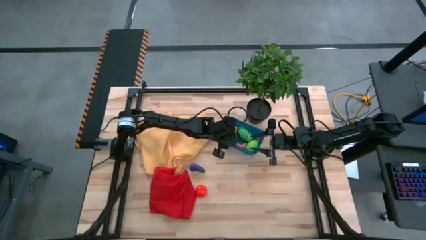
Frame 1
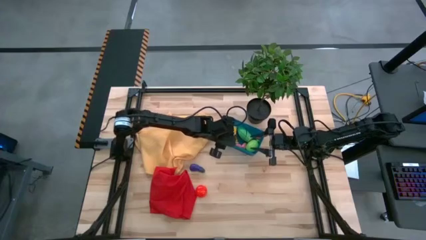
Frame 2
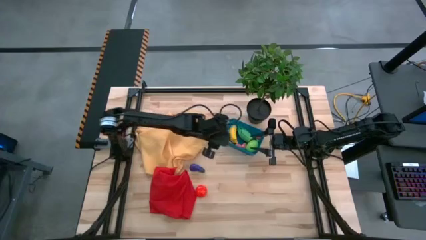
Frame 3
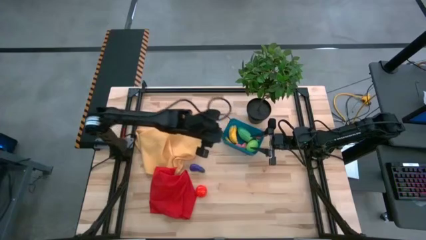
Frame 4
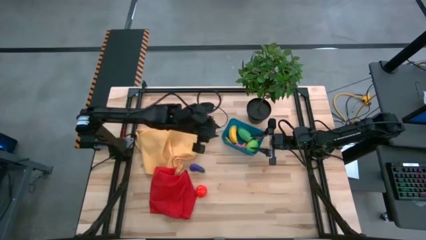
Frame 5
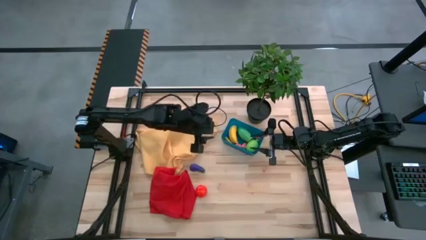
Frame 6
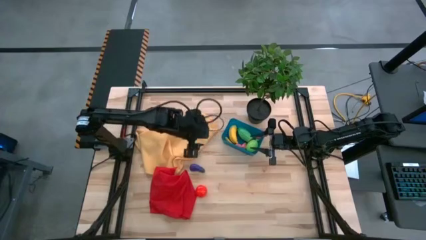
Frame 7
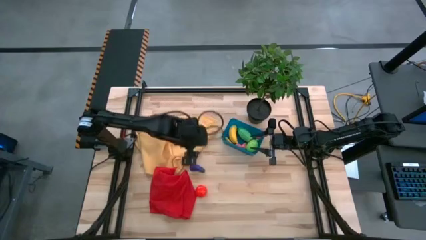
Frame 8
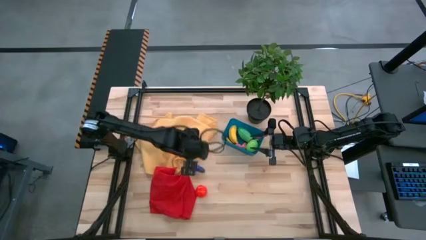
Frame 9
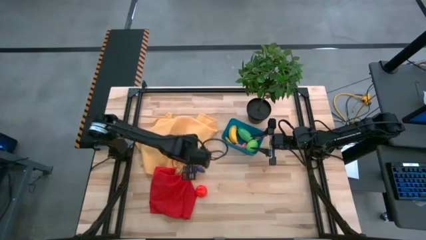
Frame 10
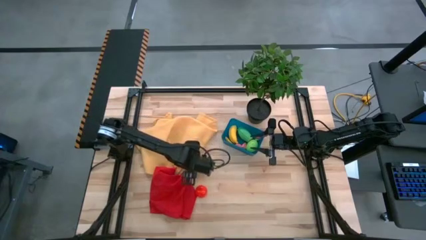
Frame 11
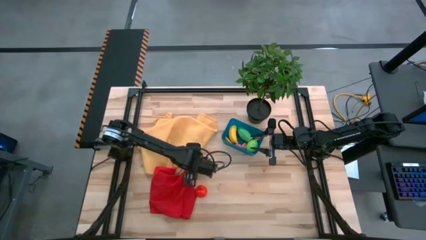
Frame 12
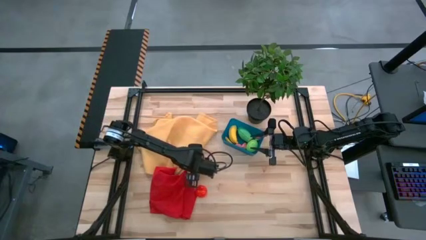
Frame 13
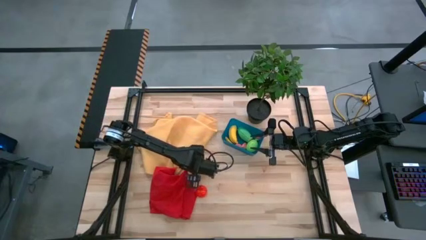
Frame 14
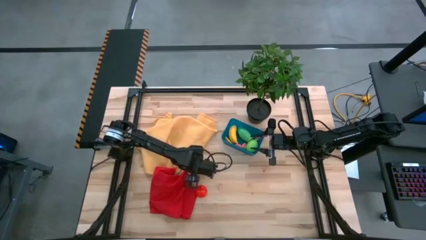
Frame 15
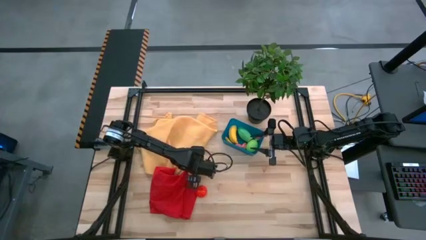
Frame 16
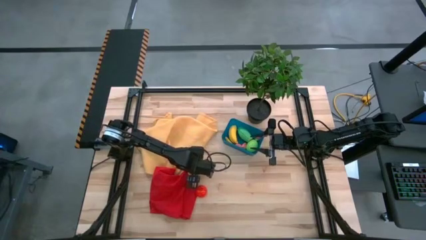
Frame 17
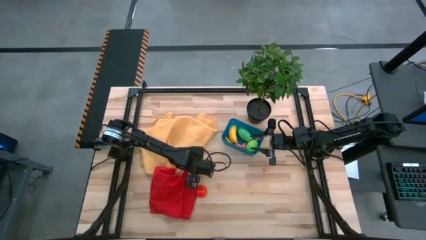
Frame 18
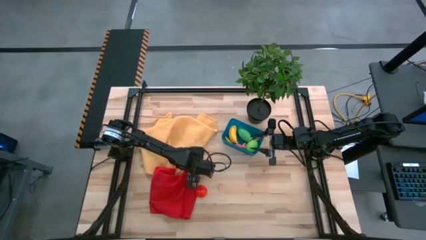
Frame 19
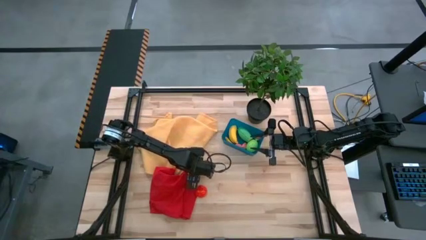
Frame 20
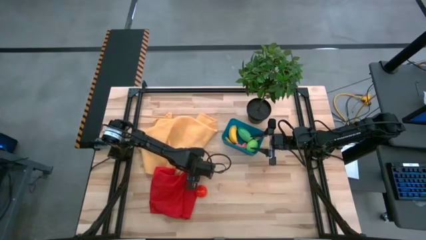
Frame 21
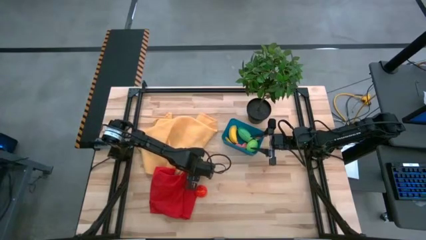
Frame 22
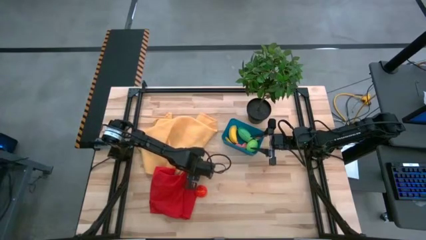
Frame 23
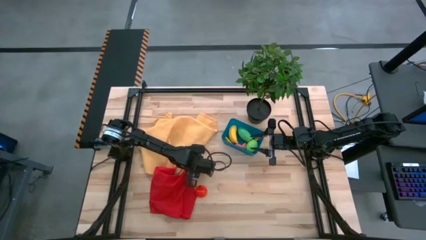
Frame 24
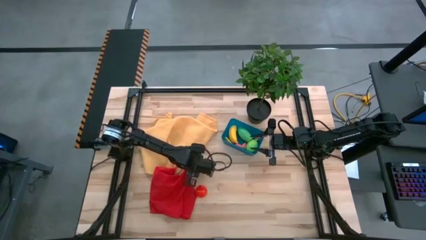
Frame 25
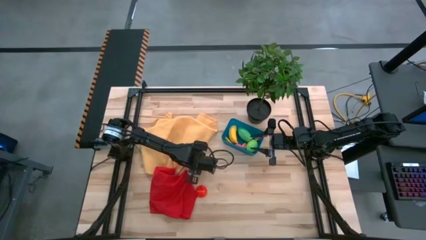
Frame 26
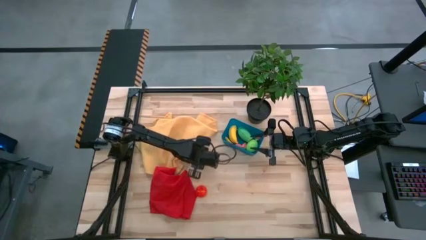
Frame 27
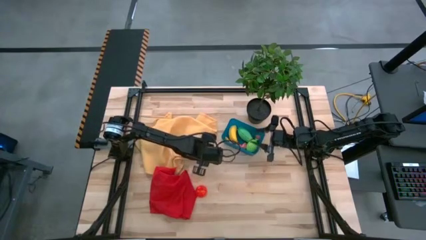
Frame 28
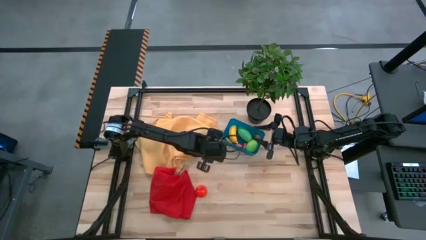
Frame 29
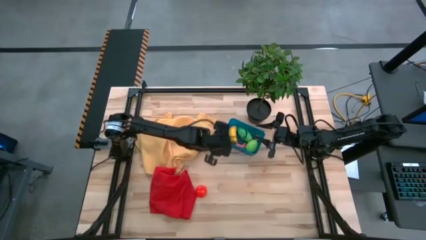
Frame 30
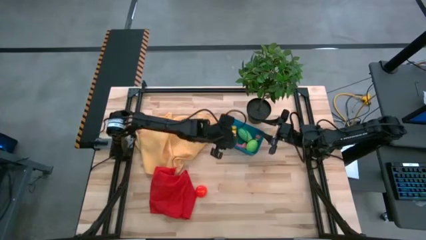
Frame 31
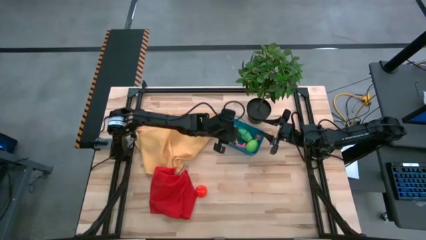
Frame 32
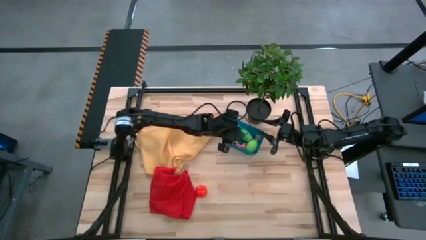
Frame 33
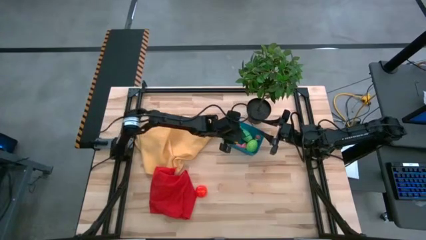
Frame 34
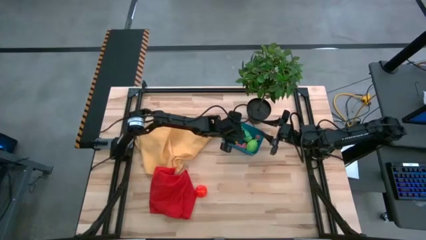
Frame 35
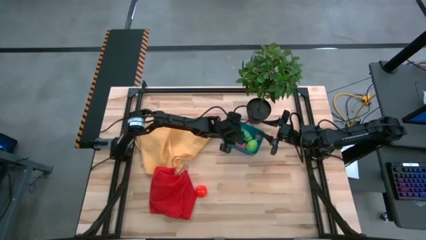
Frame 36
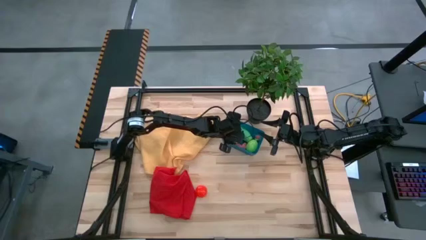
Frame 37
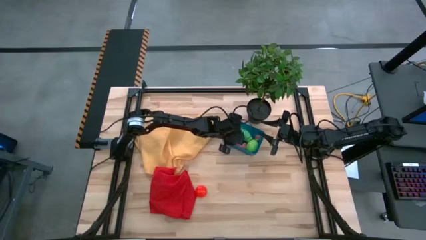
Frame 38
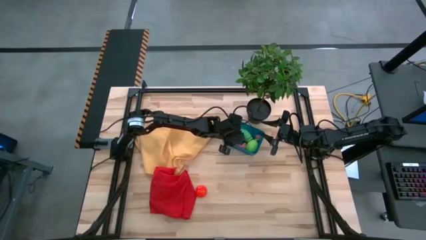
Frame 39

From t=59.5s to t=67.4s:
Task: Pick and placing Produce into tupperware
Put the purple eggplant into the blue bin

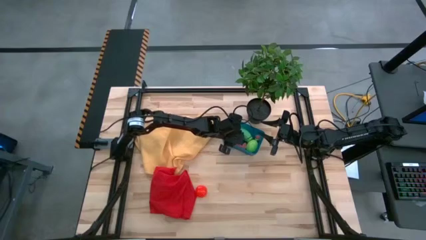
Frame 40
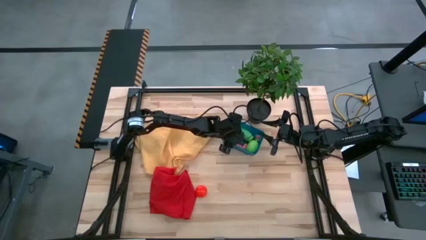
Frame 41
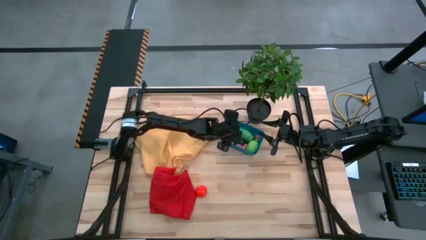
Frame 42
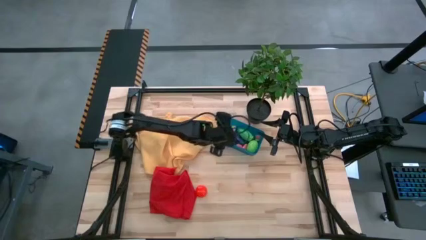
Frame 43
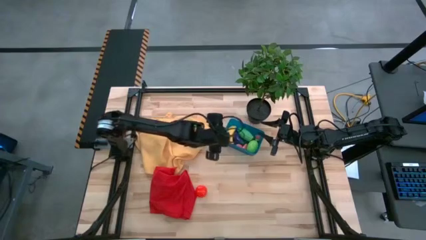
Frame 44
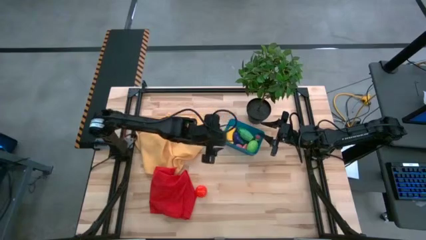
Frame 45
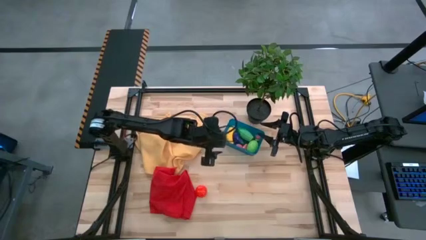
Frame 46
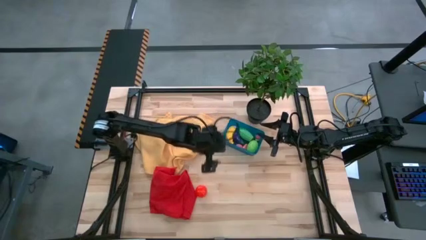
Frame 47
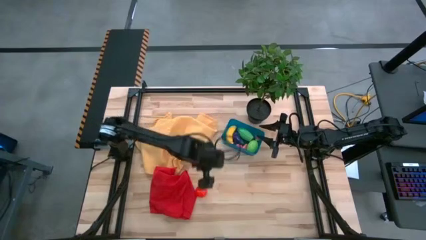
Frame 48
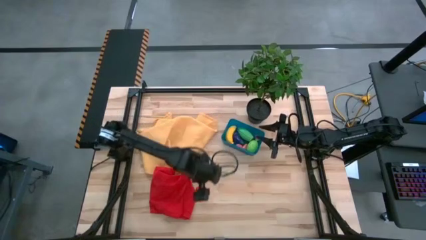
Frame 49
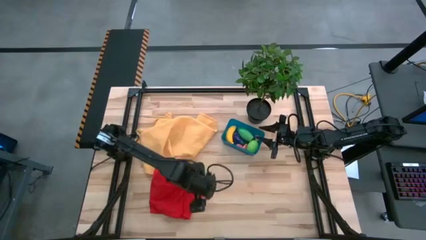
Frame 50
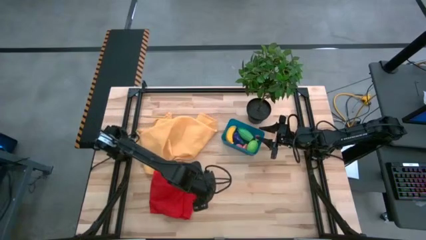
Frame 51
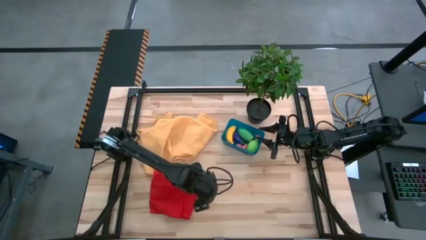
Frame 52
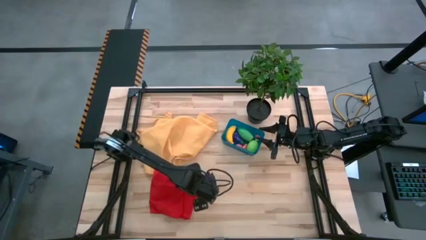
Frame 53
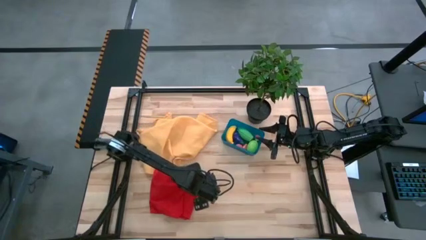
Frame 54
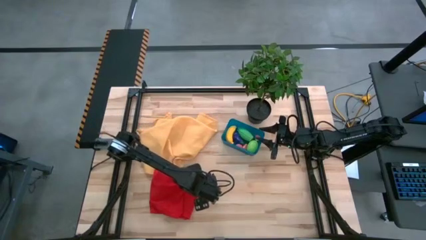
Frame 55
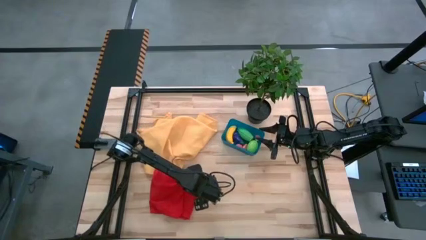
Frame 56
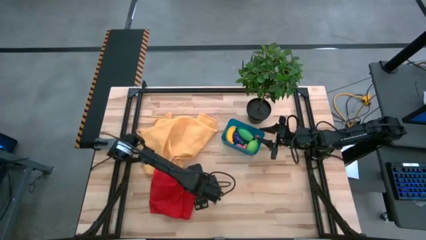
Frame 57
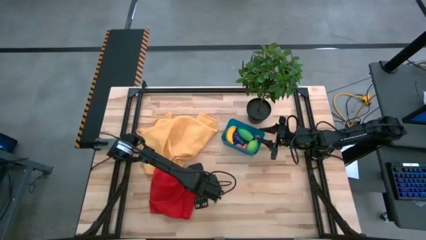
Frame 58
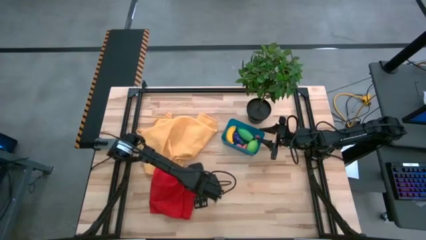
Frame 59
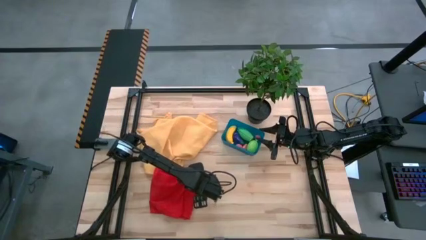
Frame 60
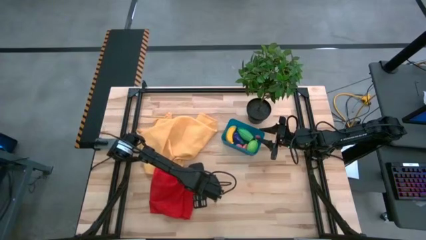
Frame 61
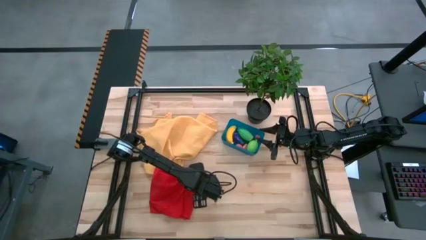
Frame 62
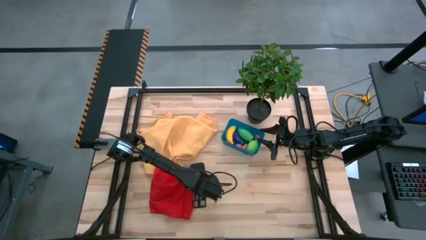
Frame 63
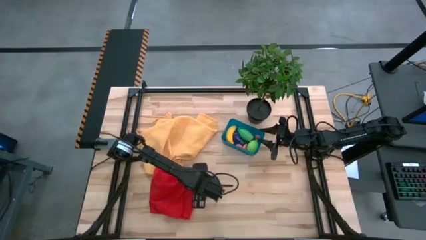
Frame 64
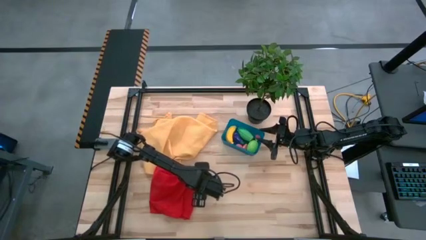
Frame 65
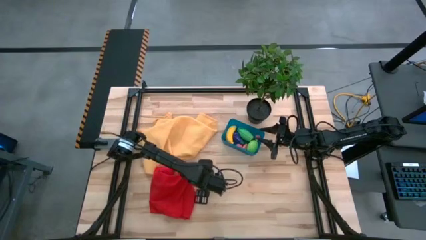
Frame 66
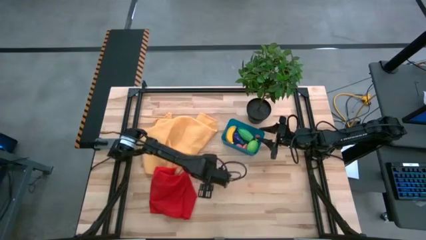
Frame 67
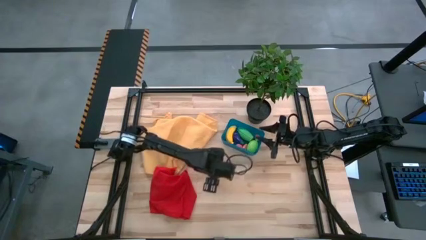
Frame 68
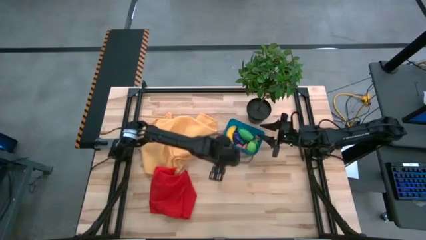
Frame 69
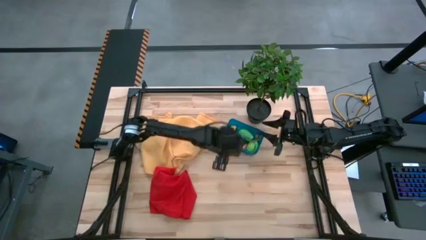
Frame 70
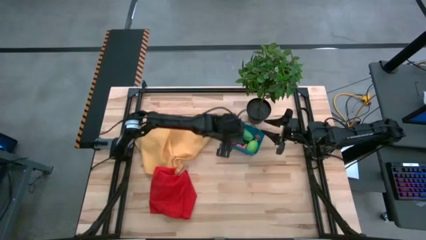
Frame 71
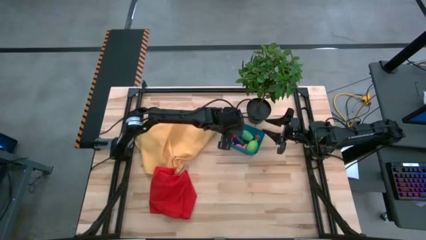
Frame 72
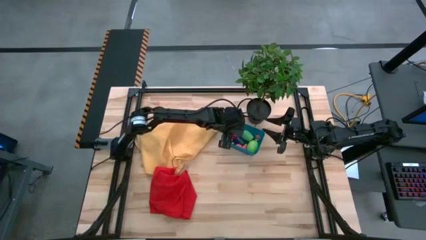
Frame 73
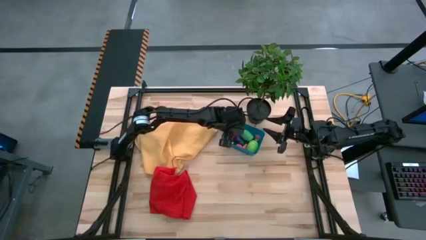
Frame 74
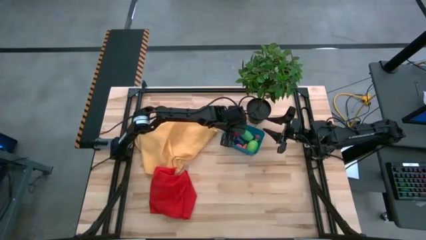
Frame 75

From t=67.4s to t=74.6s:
Put the red tomato into the blue bin
